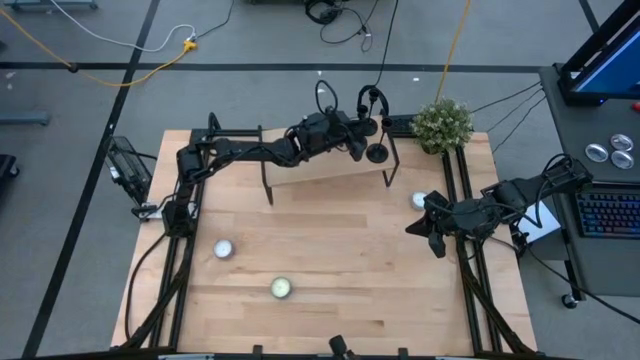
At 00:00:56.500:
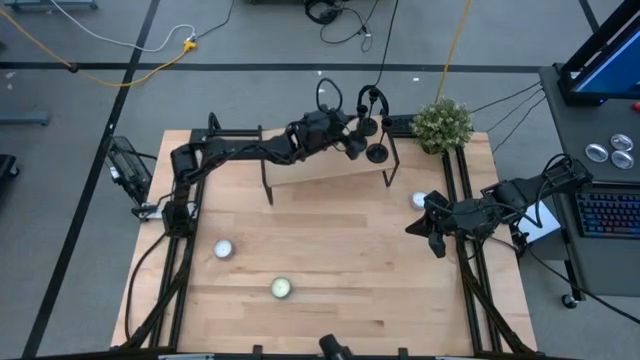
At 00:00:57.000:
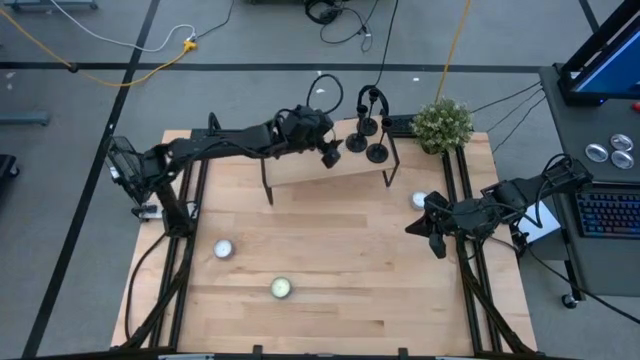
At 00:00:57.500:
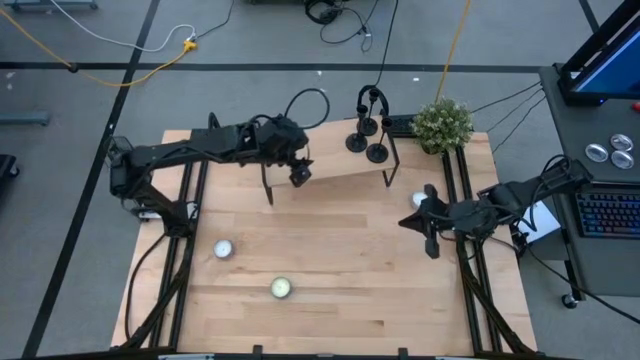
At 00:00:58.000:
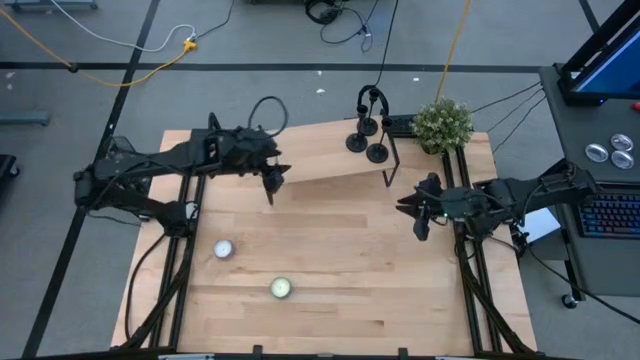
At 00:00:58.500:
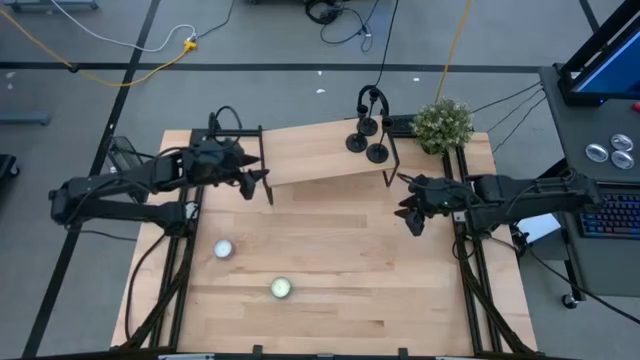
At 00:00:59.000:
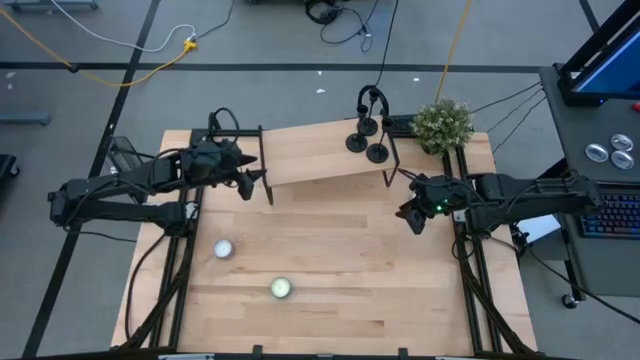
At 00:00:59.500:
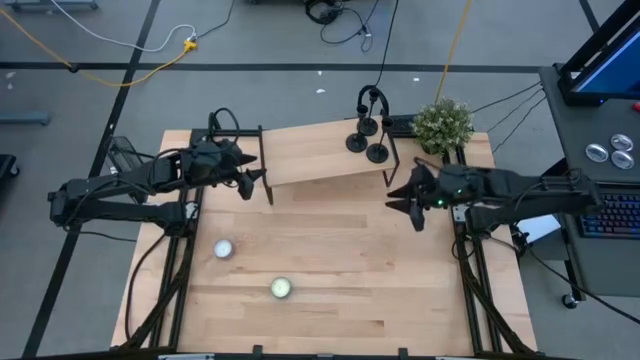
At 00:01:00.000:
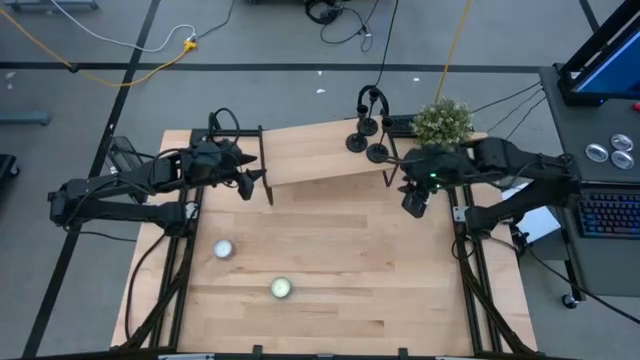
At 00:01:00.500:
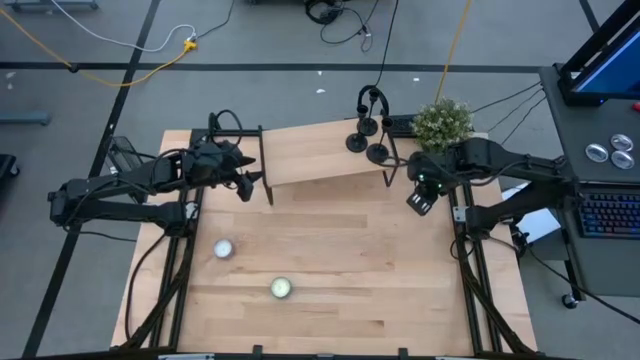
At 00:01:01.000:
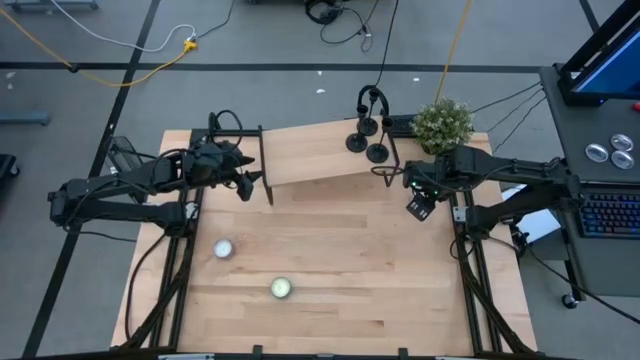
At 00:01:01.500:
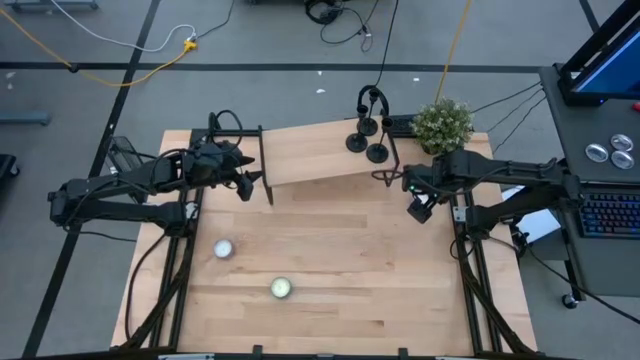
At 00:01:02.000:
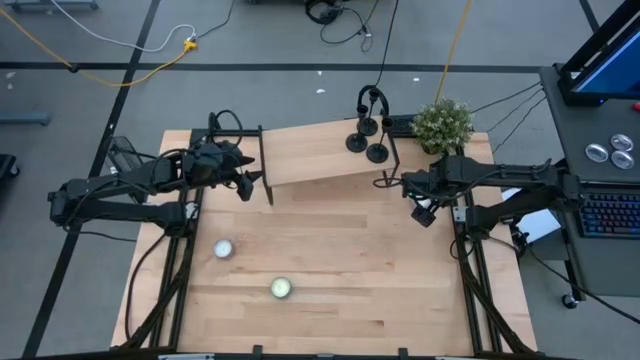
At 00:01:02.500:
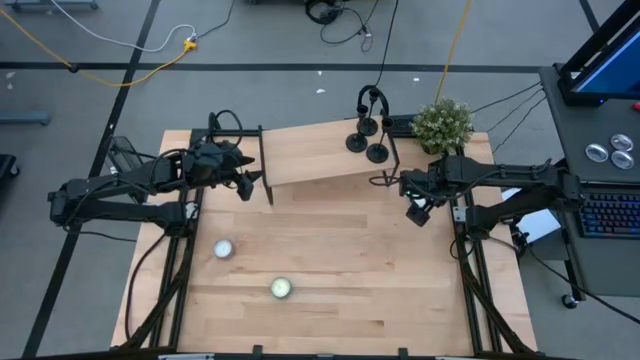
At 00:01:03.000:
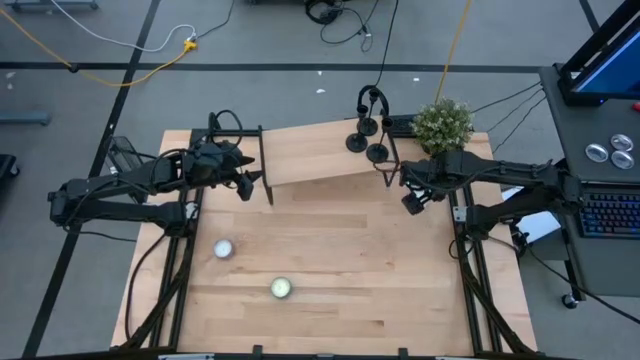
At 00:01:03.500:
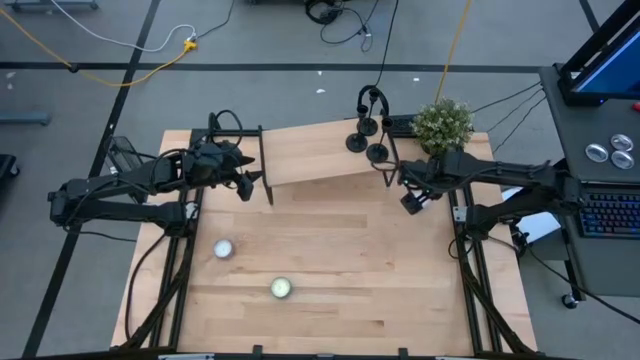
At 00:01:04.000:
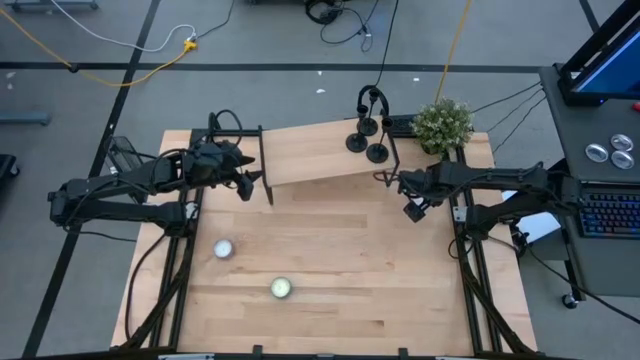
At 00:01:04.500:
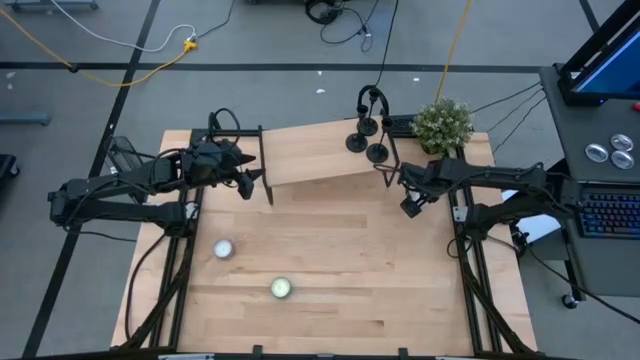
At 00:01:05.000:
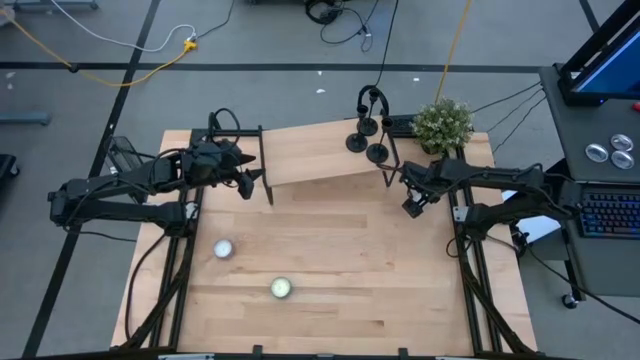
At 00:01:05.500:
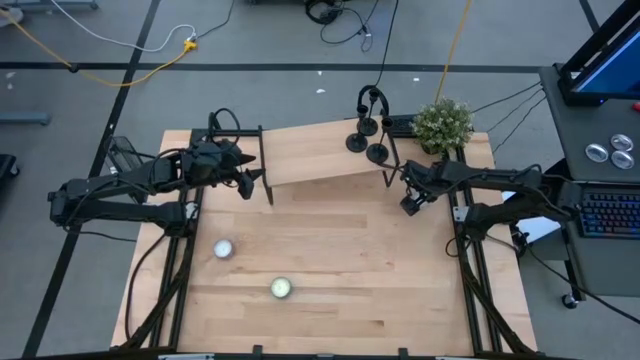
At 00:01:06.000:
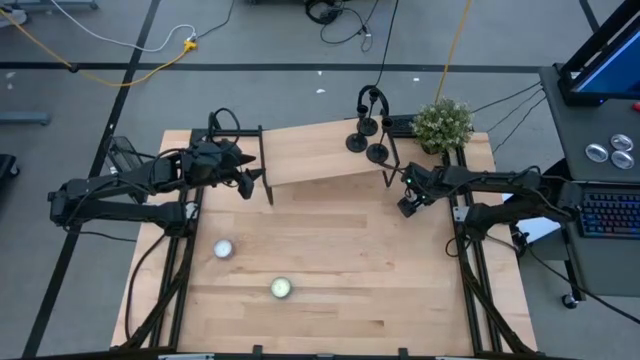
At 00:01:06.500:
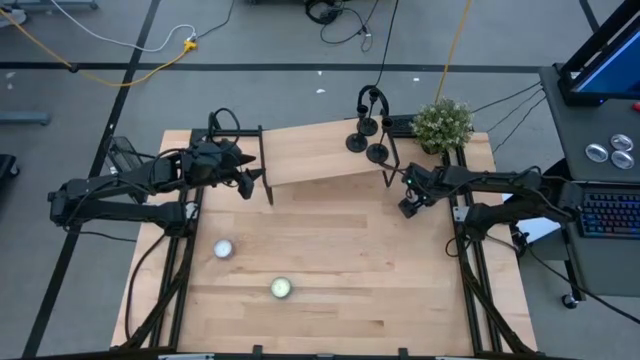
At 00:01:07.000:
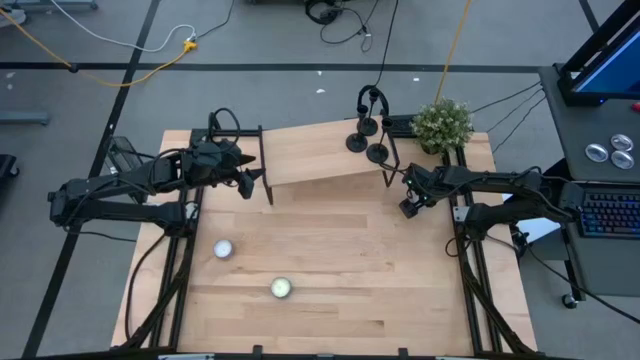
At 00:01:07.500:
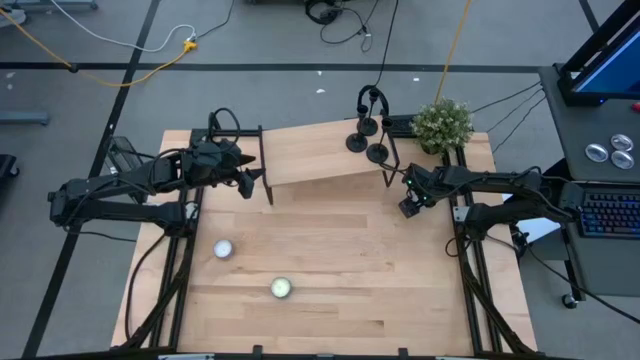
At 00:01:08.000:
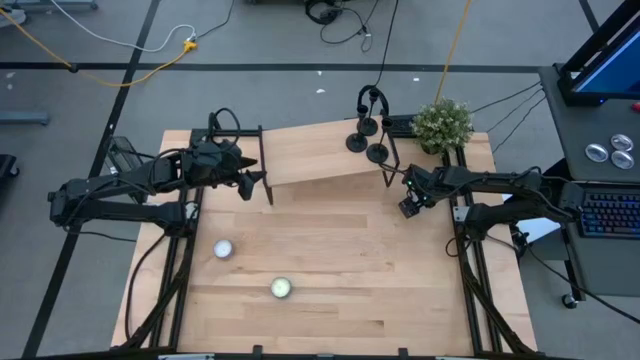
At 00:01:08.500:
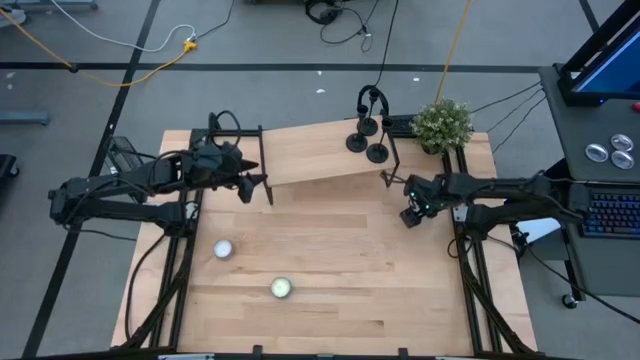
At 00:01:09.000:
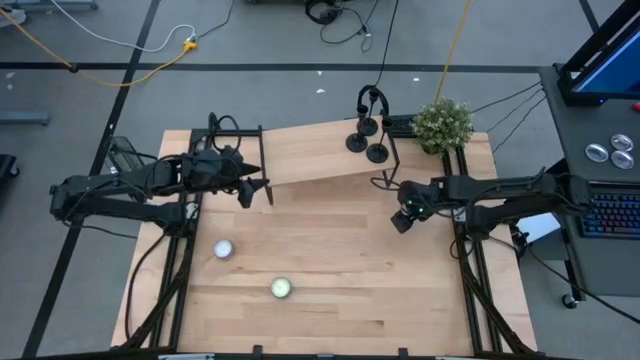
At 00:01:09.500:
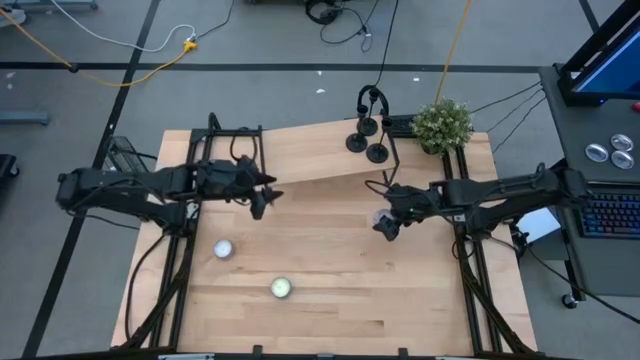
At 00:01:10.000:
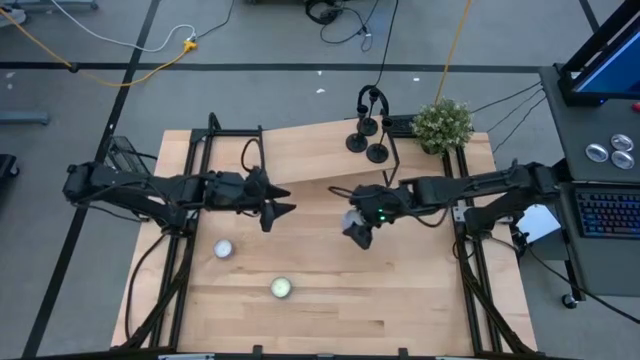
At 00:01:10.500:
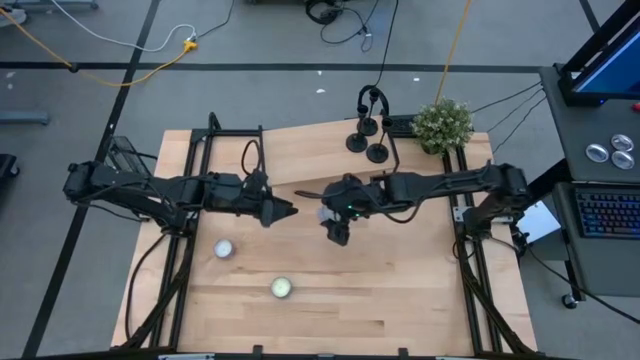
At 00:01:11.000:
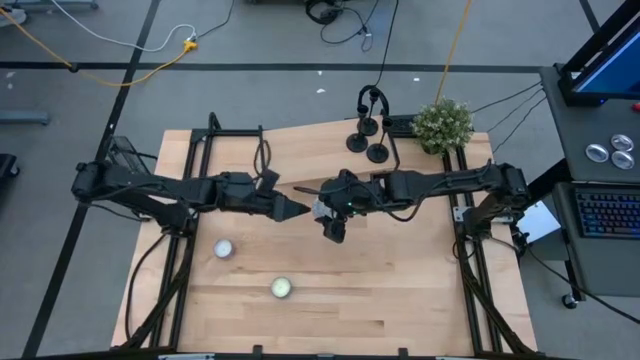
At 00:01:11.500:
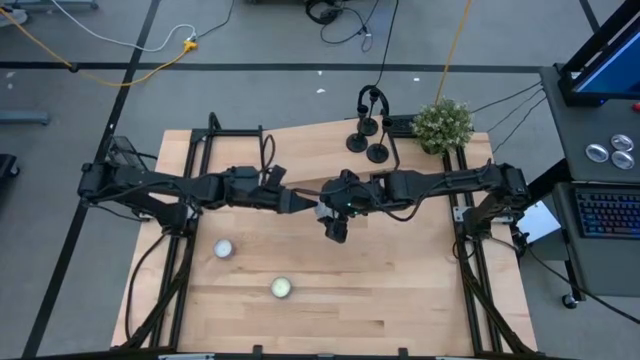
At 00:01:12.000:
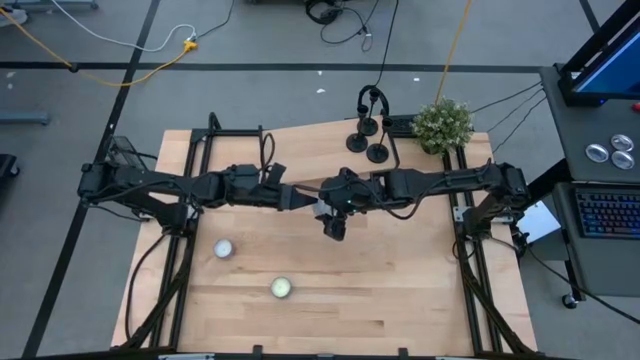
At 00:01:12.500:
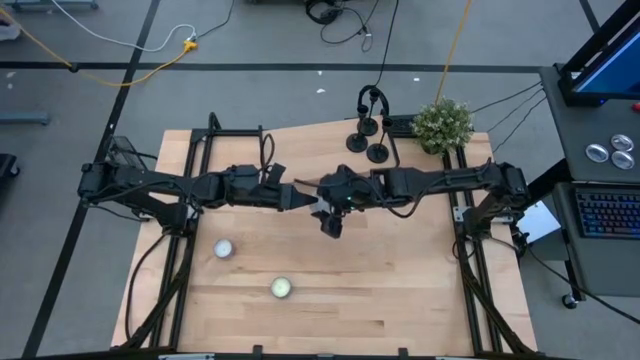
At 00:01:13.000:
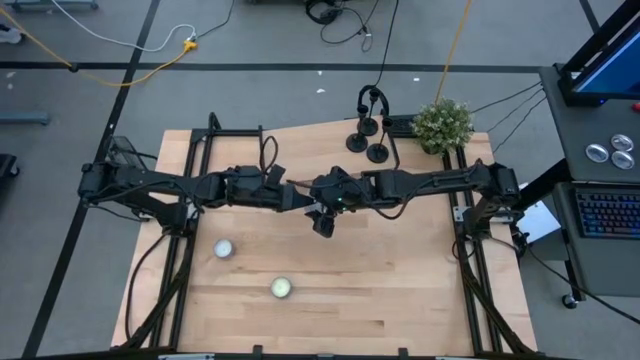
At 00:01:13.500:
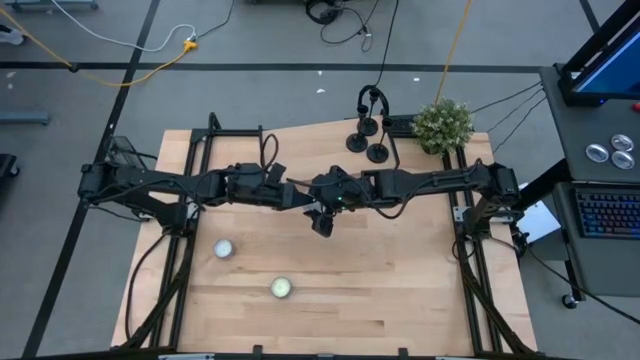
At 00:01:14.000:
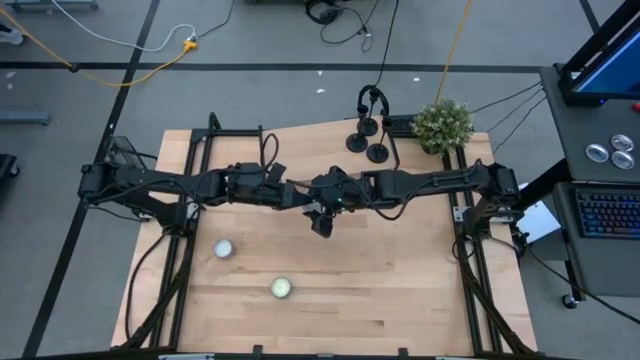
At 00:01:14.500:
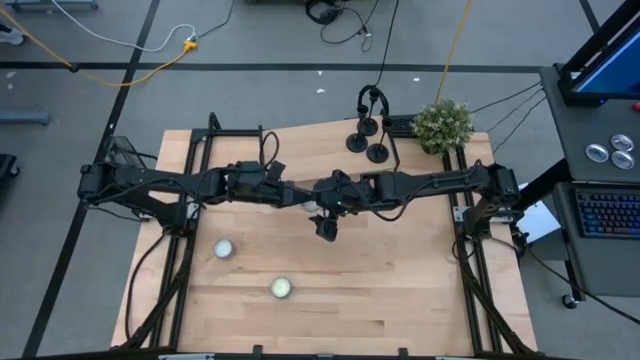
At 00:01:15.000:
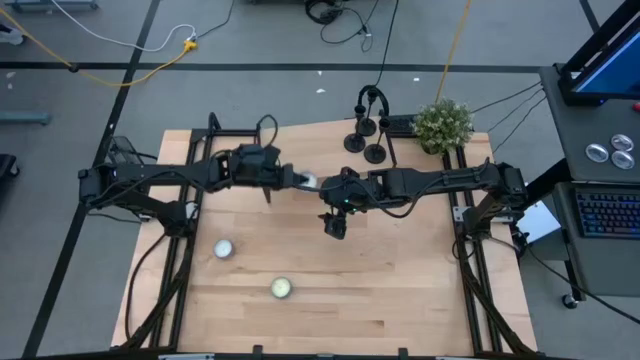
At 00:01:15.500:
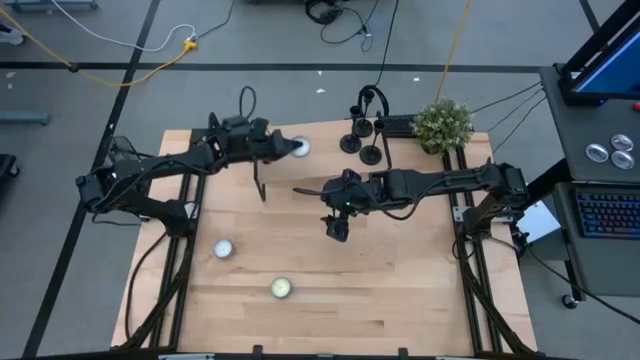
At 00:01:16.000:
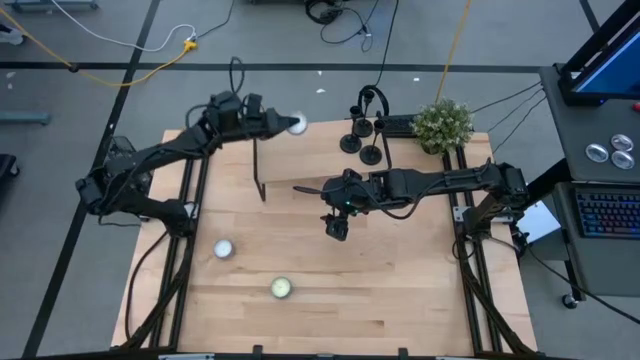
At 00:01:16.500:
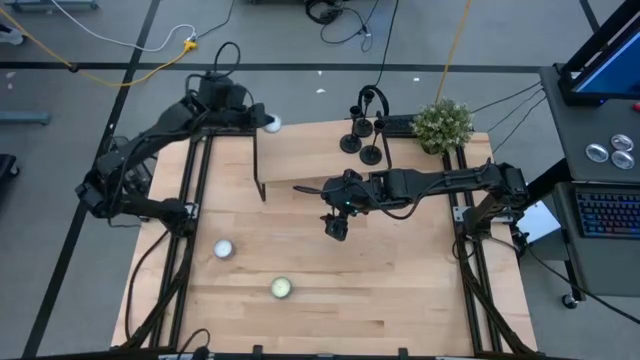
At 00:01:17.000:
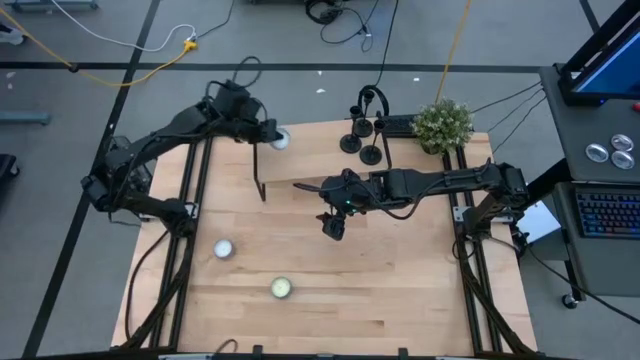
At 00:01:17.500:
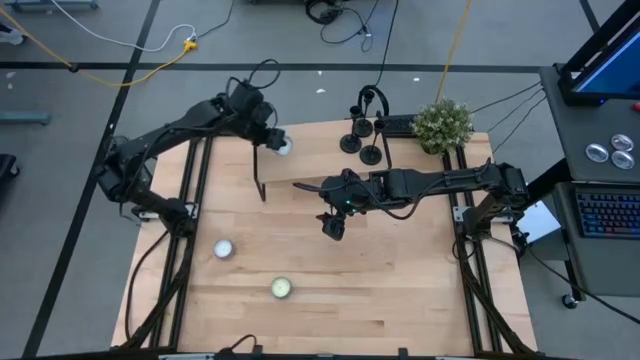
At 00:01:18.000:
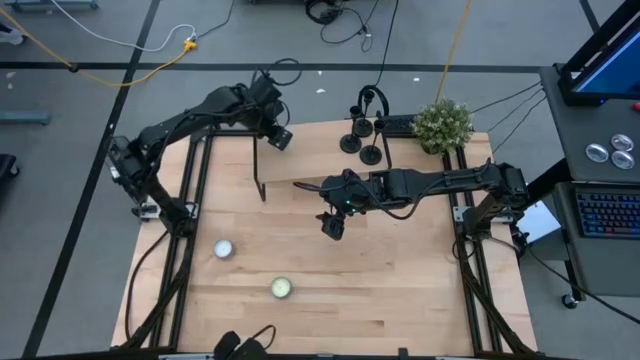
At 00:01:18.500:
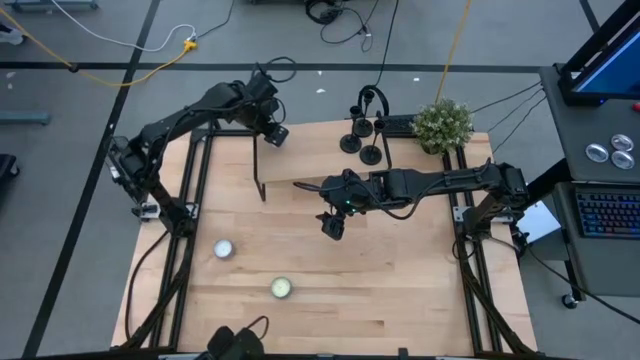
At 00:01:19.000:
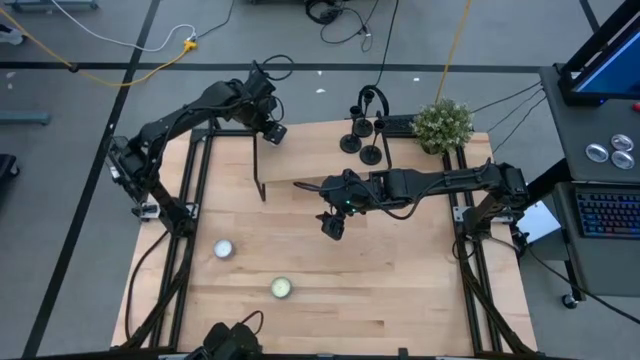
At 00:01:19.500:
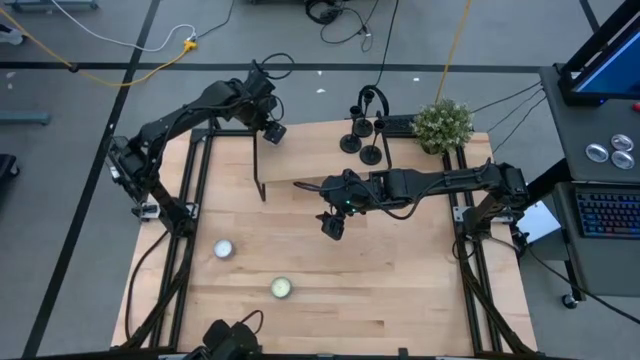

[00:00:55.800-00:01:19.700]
Task: Pick & Place candle stick holders
Put the red candle on the shelf
